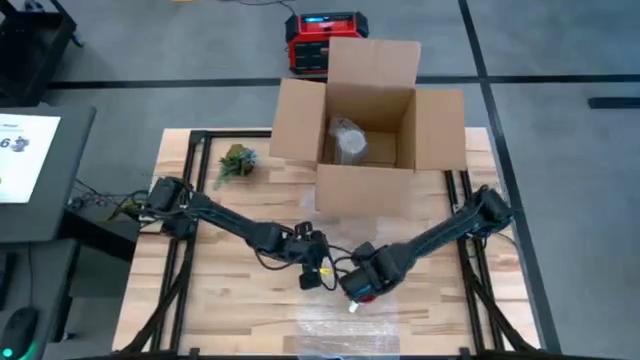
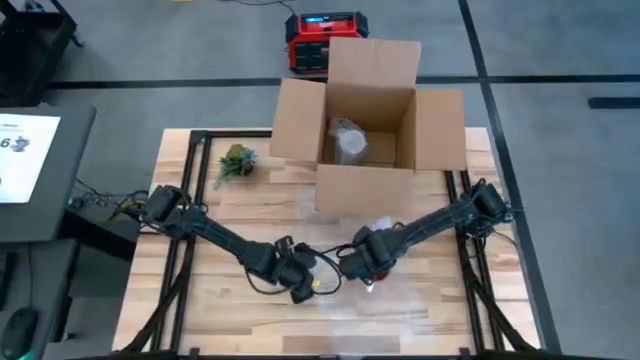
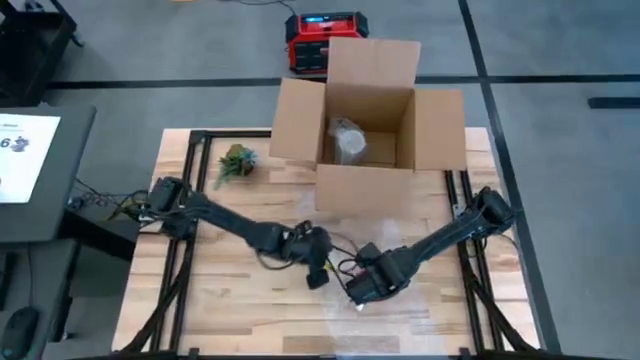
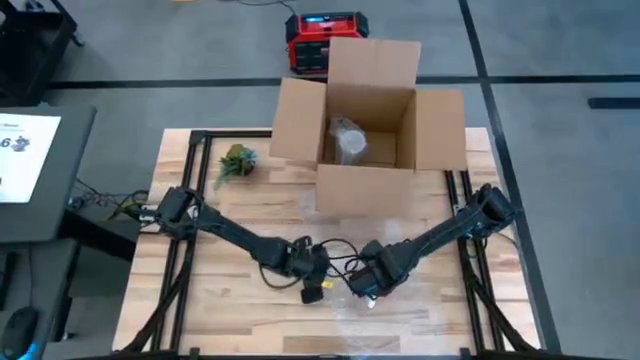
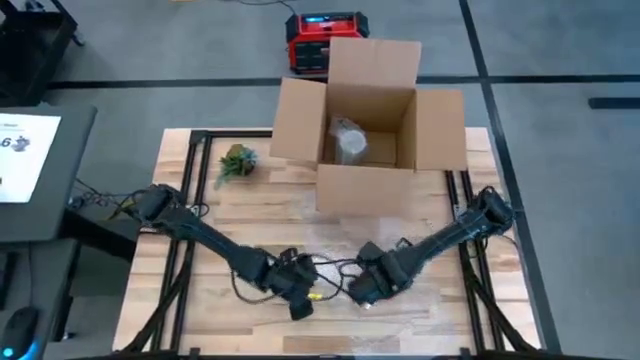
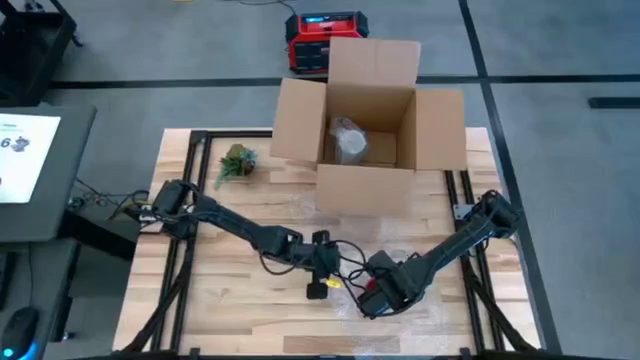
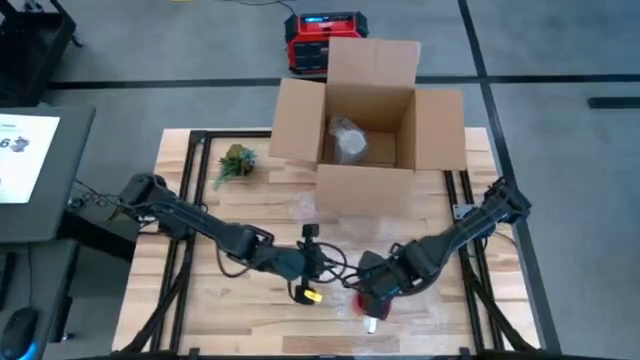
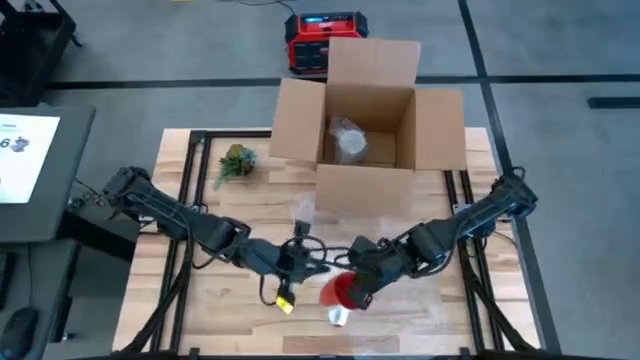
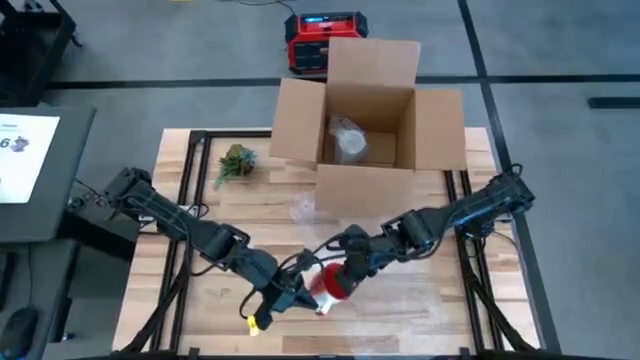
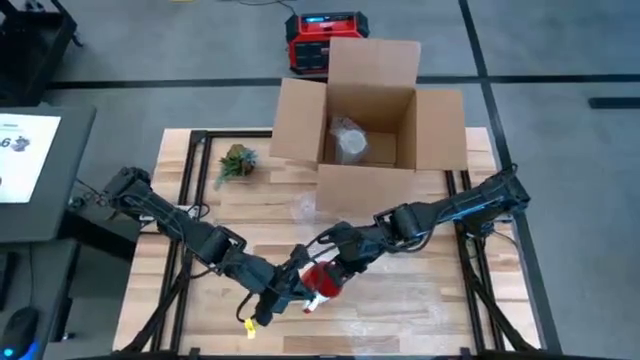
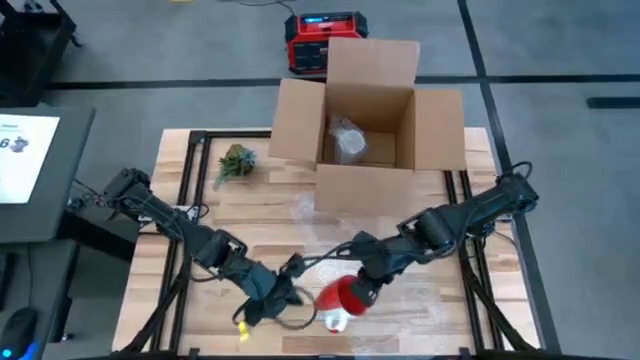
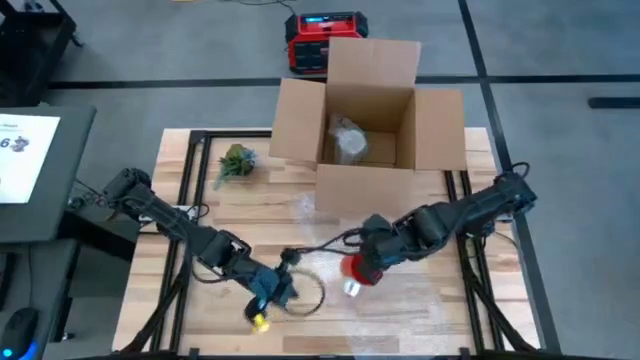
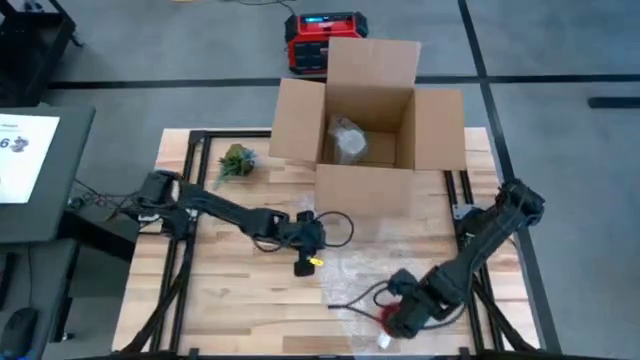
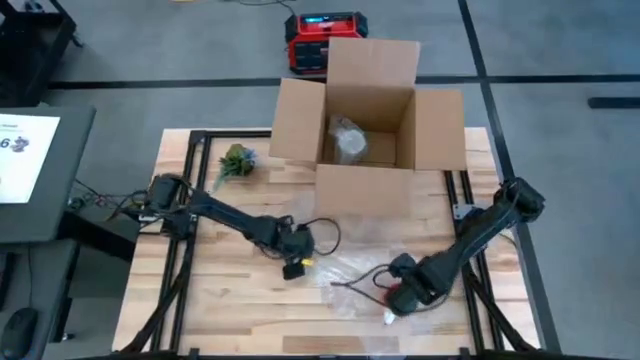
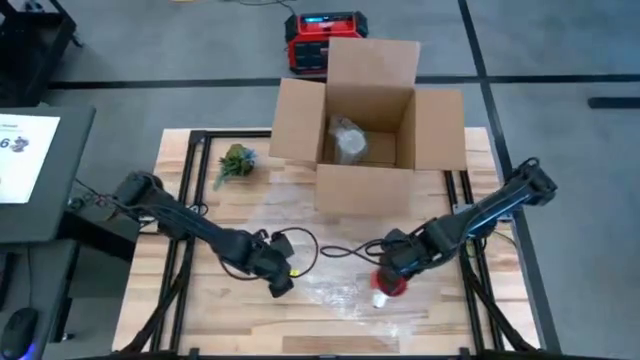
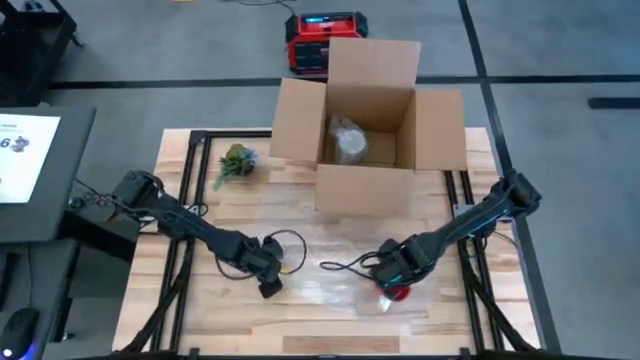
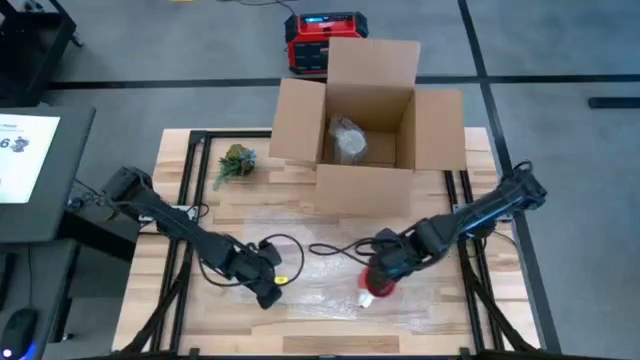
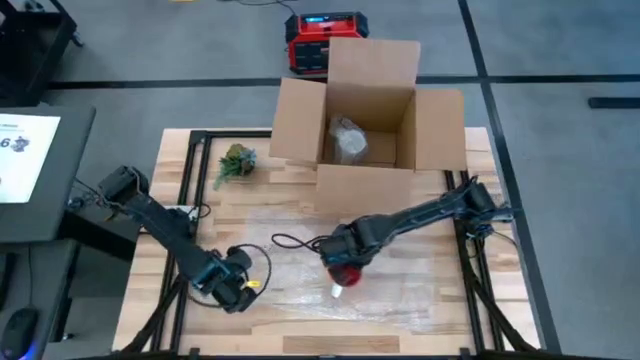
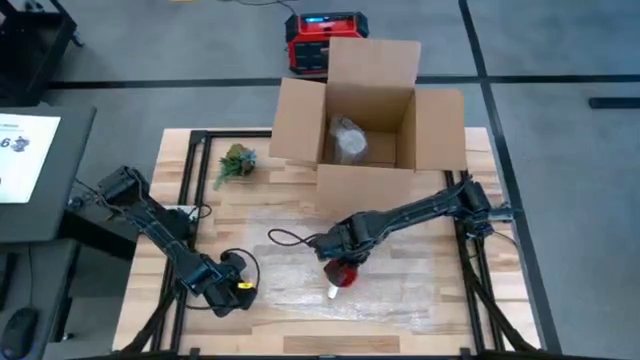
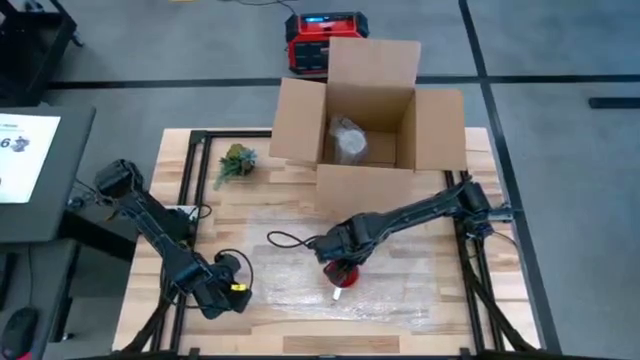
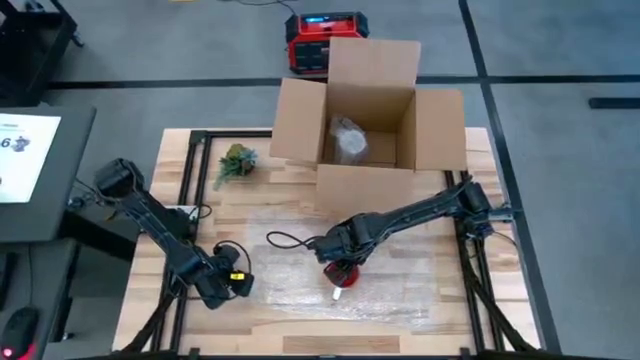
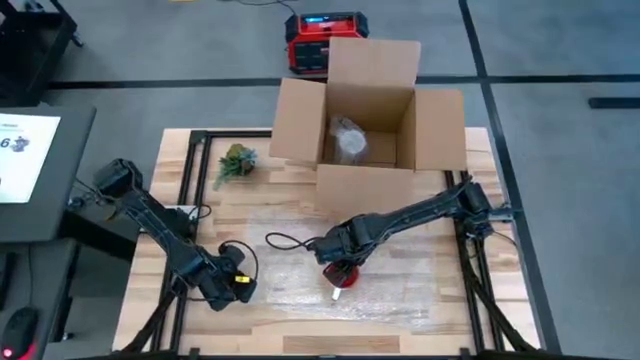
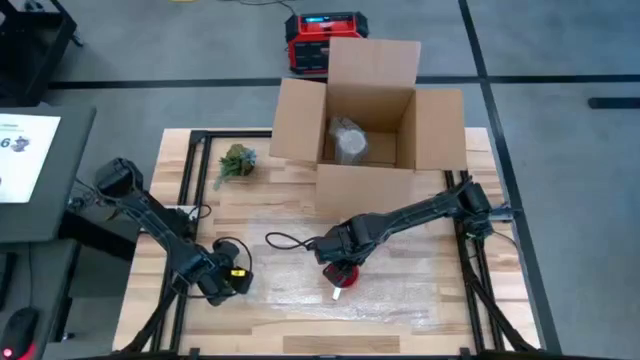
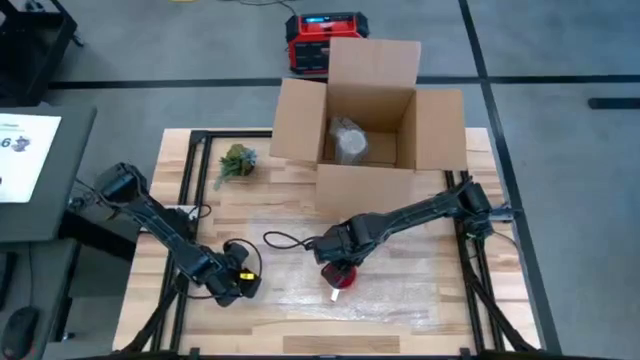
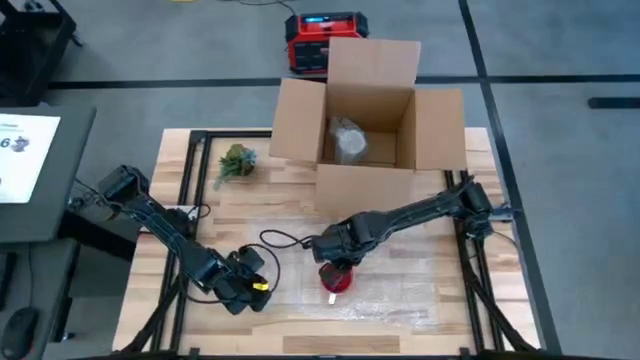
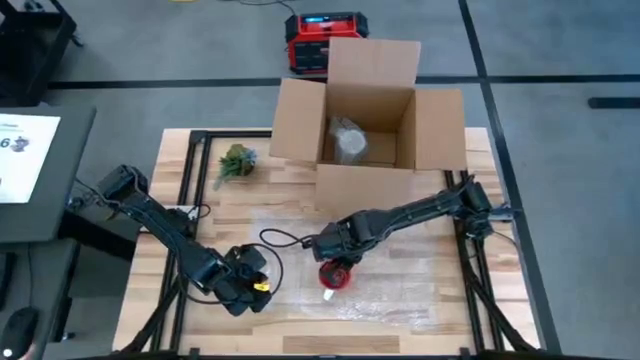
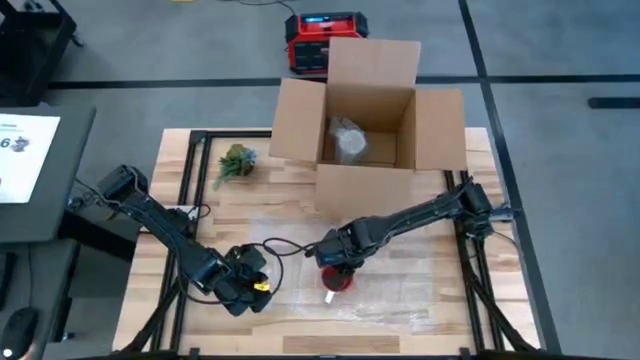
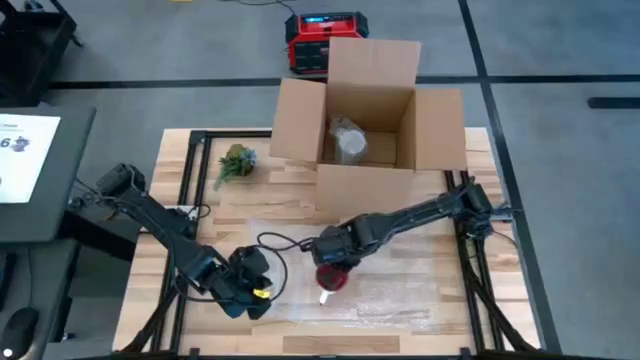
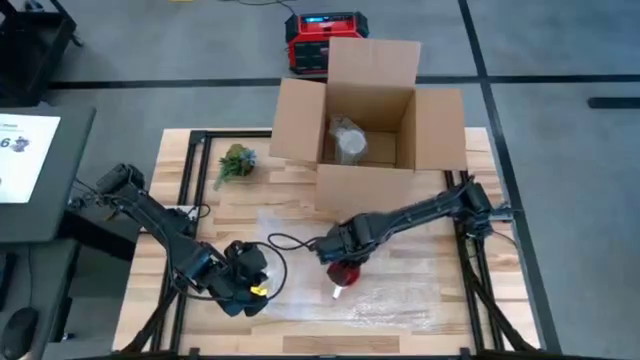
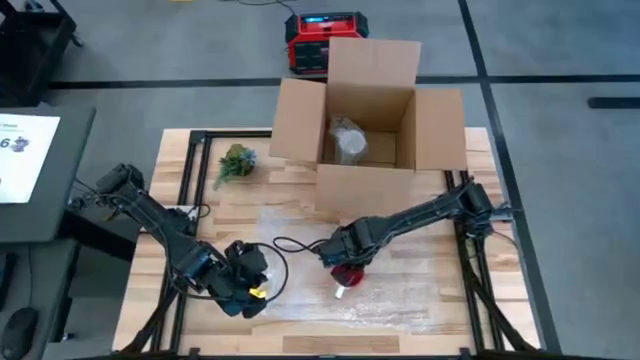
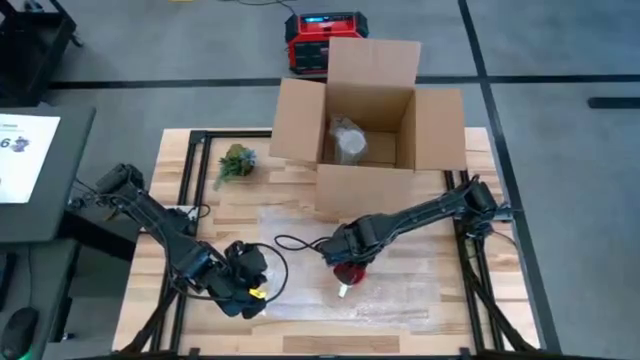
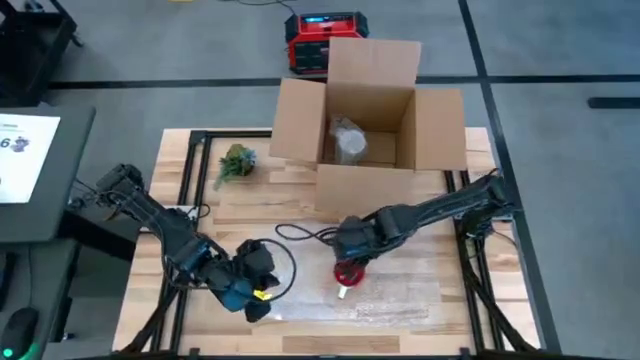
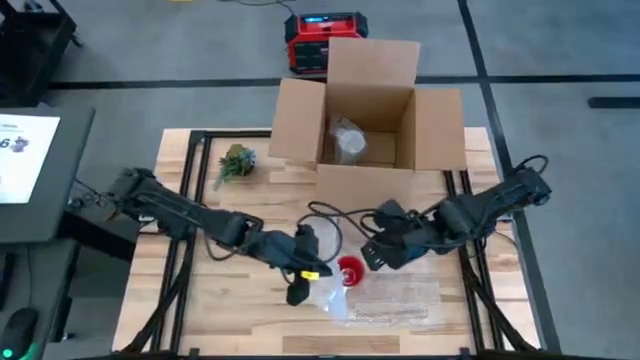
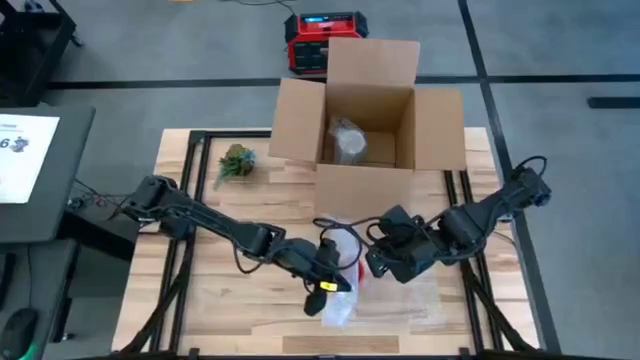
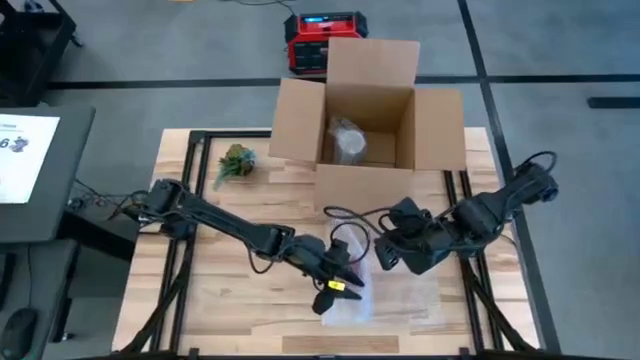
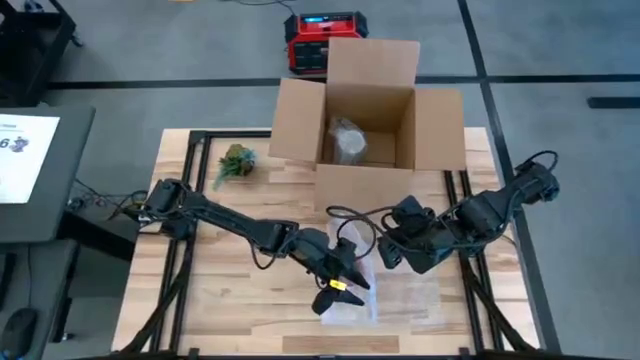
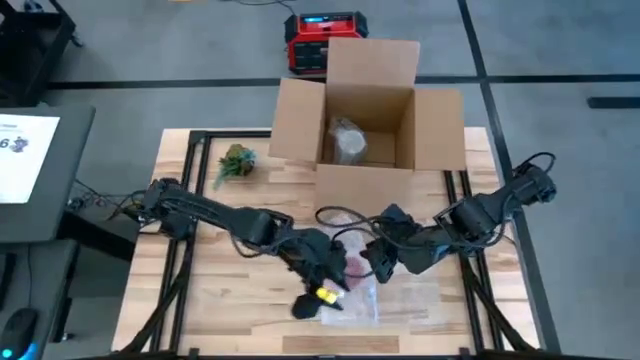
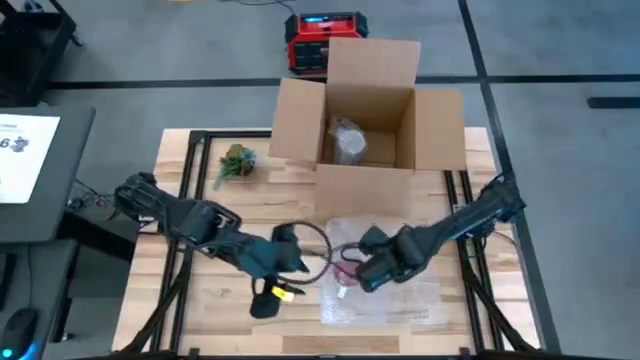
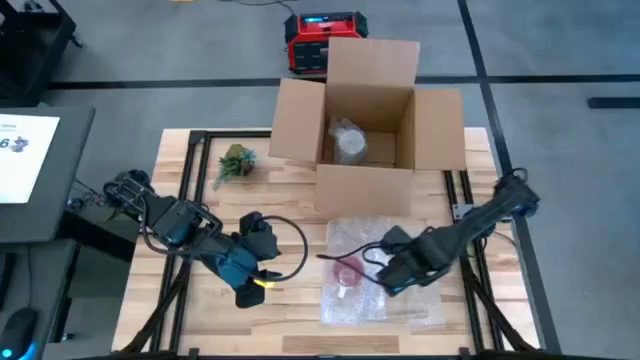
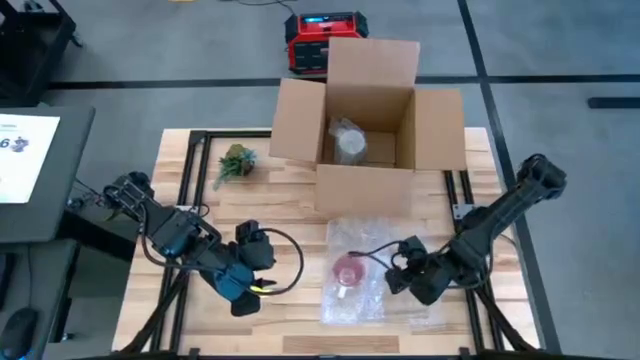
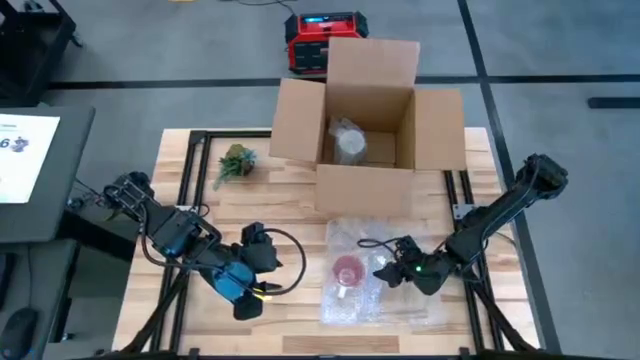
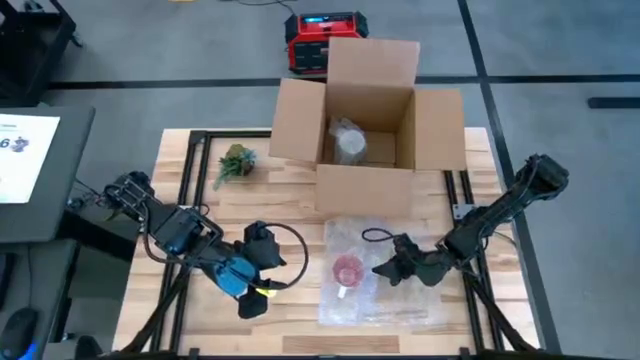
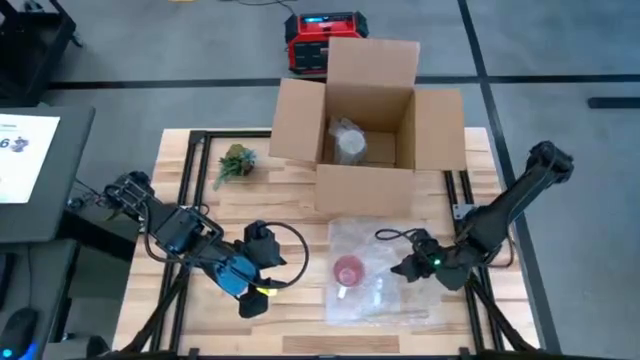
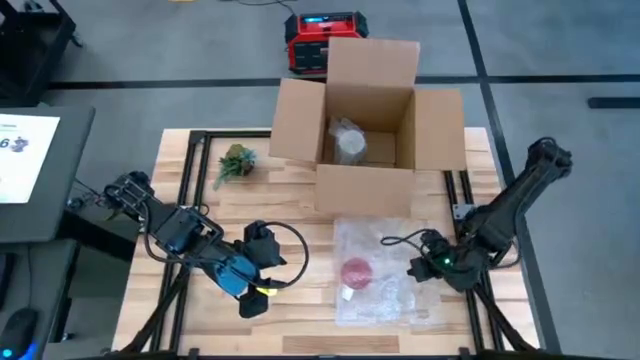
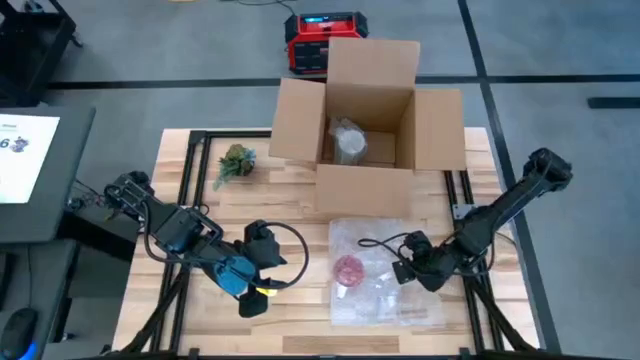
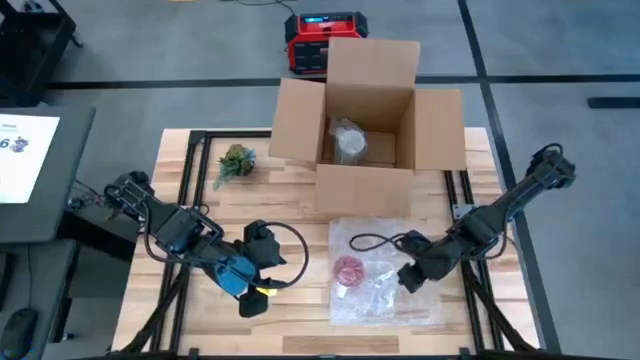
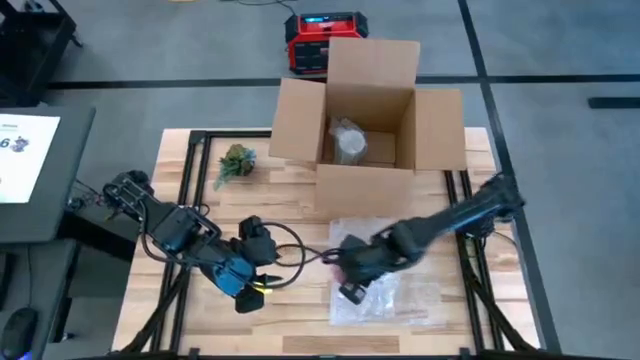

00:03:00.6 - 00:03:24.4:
Task: wrap mug
Wrap the red mug in the bubble wrap
